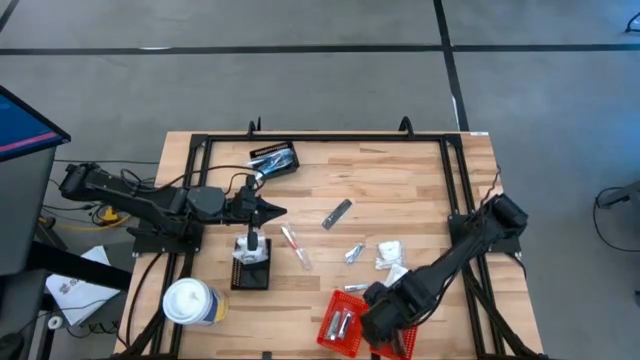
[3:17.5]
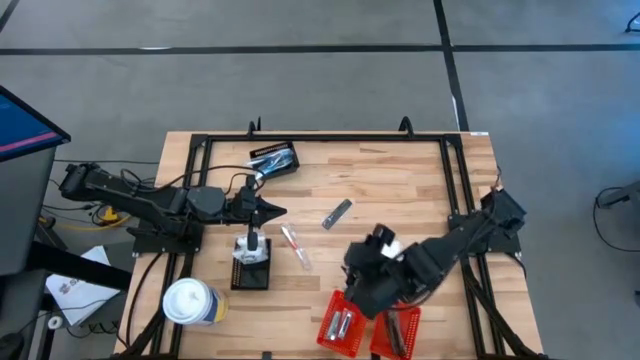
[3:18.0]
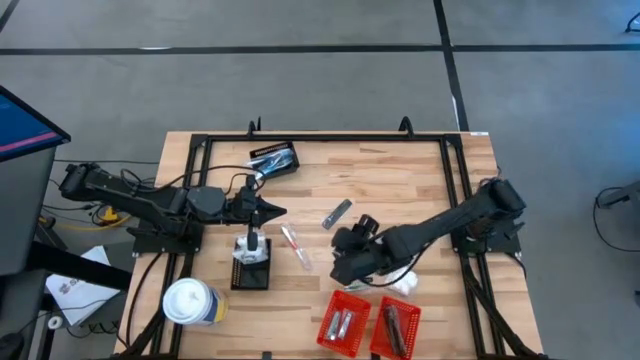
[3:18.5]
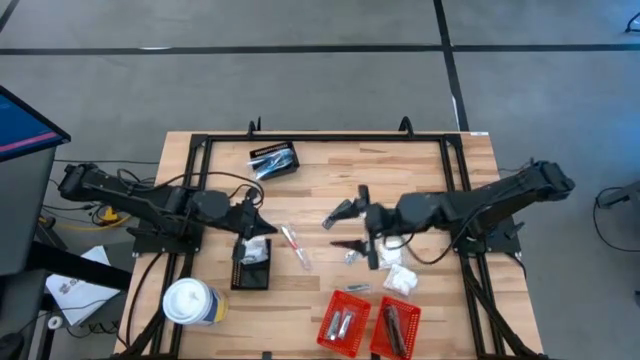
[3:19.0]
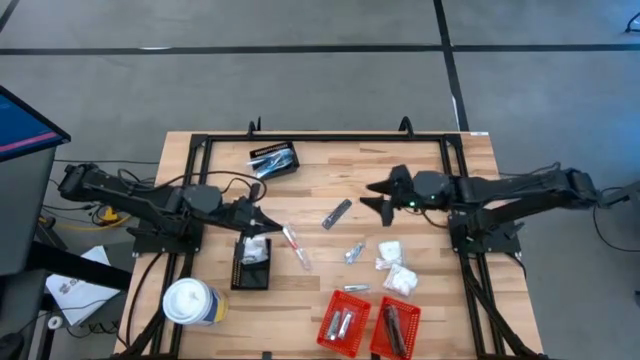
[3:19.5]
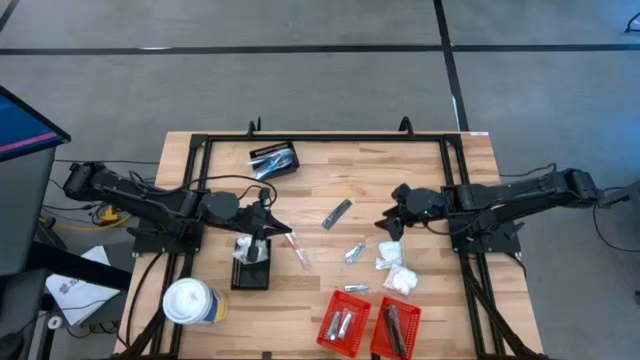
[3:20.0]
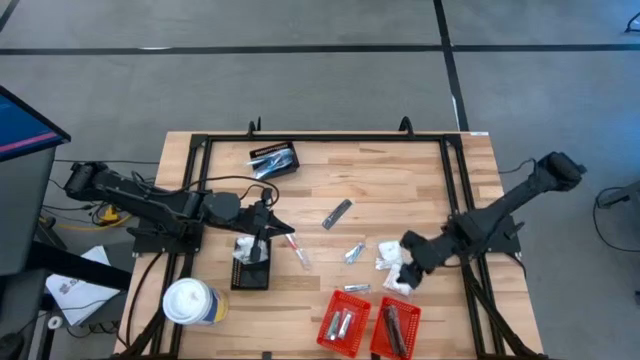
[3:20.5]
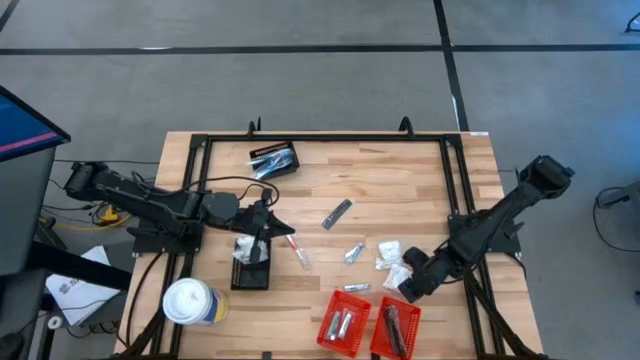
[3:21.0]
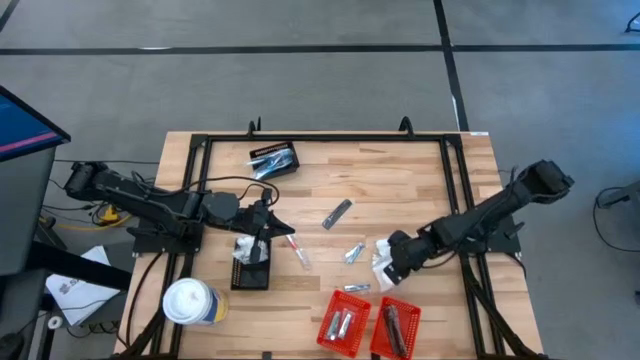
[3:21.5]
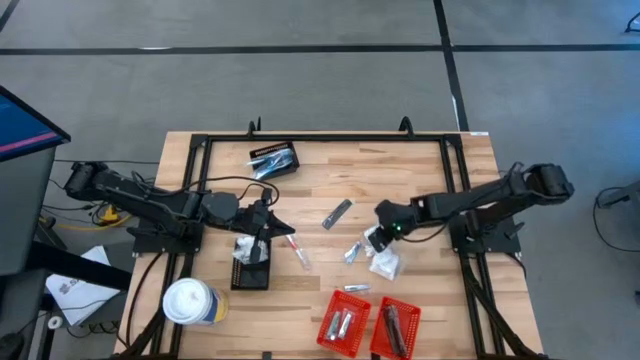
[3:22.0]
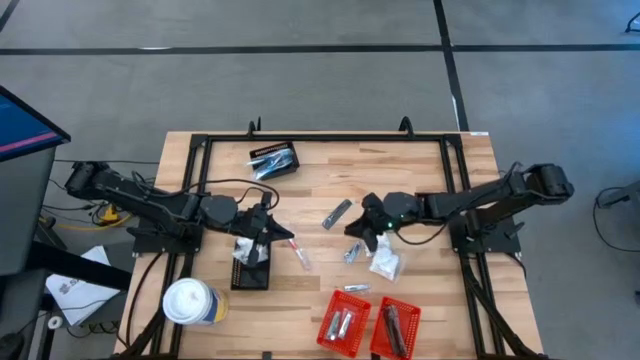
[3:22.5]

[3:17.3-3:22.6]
Task: Pick & Place Travel size toiletries
Adjust the cotton packs

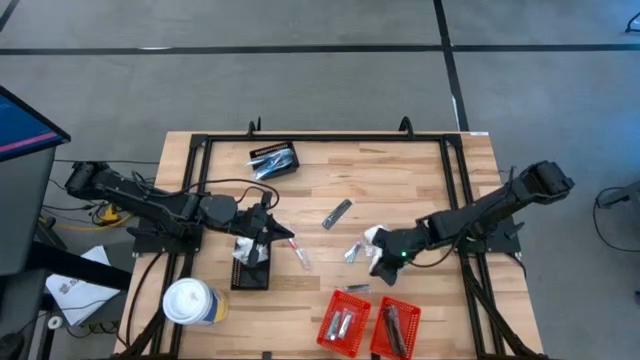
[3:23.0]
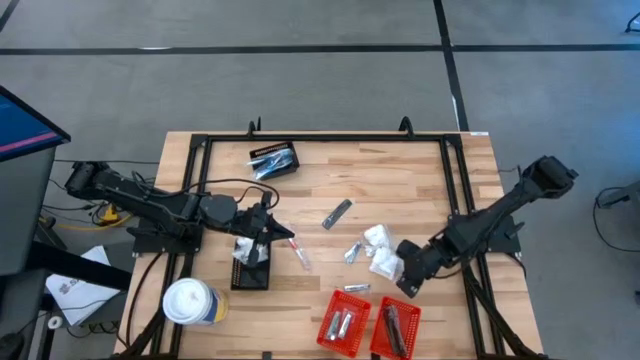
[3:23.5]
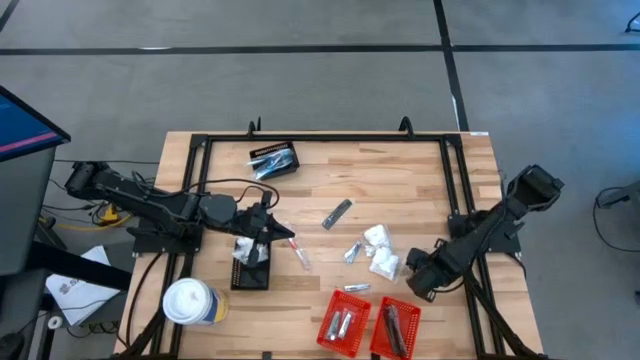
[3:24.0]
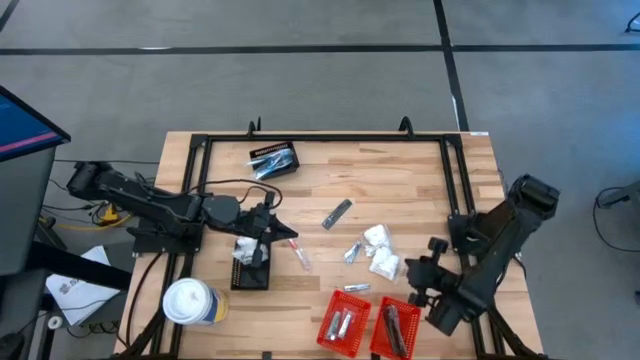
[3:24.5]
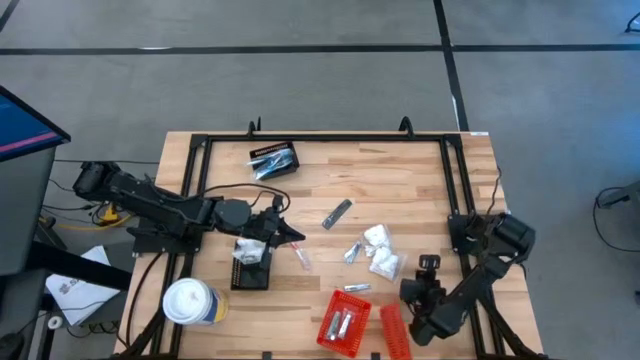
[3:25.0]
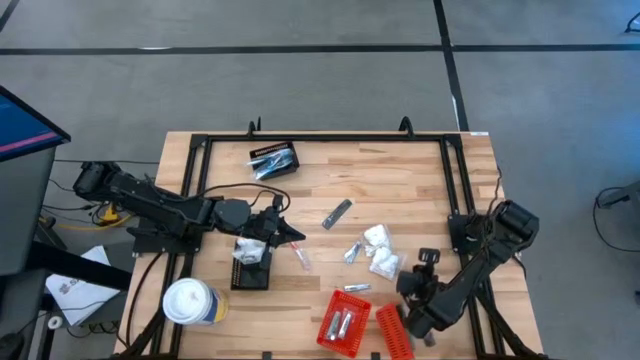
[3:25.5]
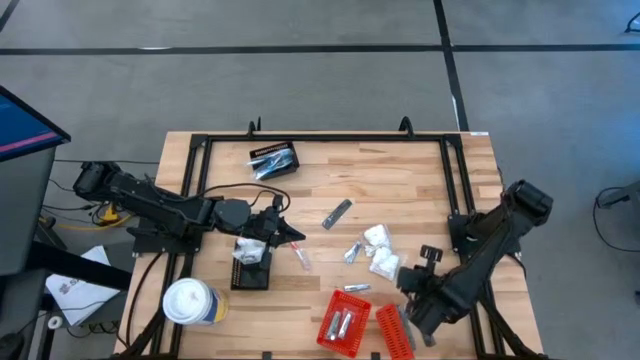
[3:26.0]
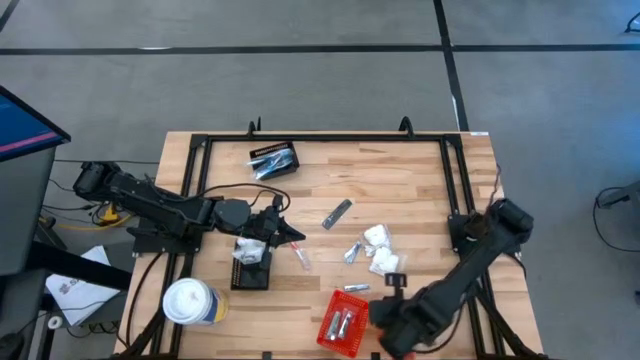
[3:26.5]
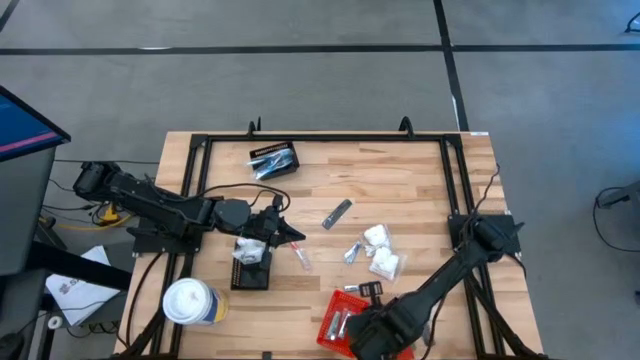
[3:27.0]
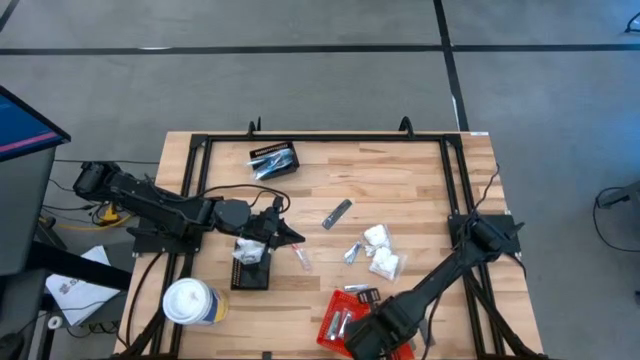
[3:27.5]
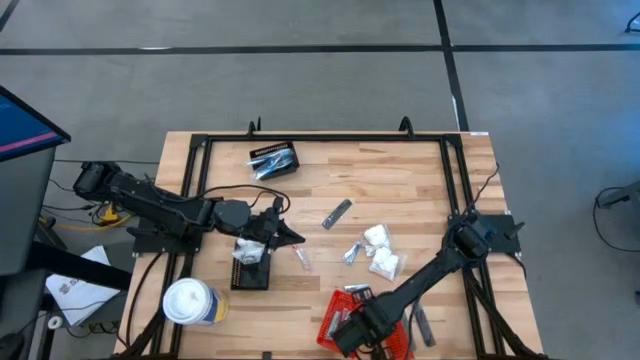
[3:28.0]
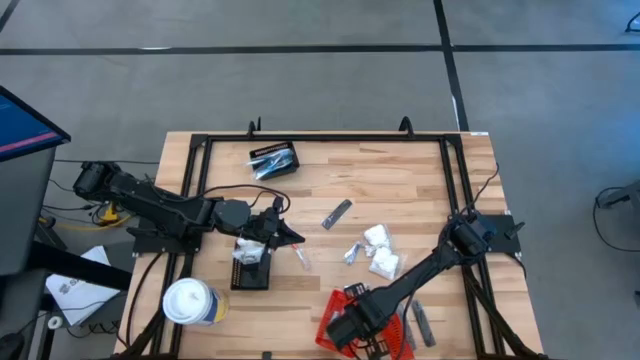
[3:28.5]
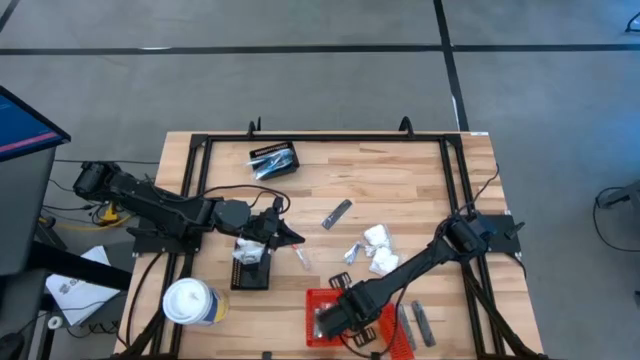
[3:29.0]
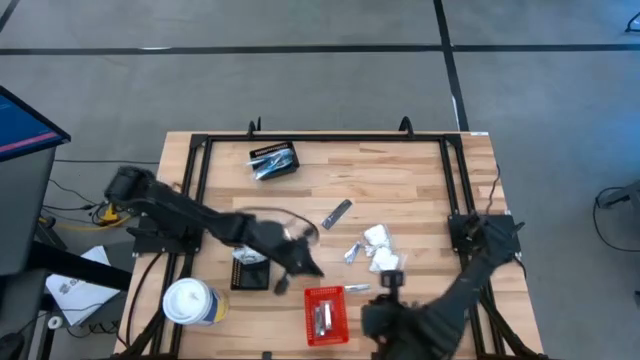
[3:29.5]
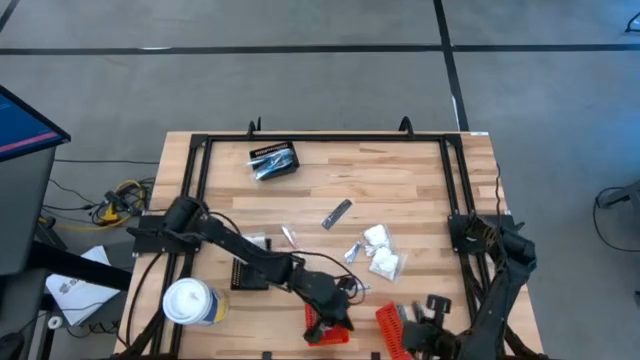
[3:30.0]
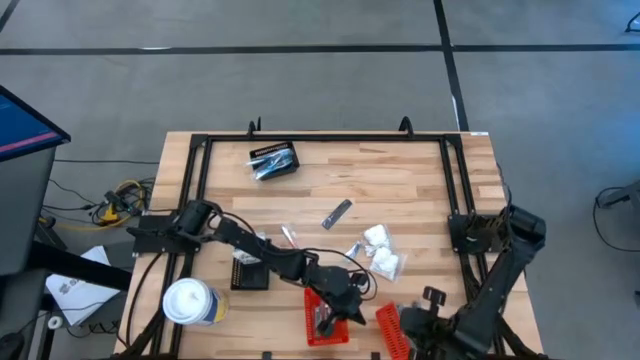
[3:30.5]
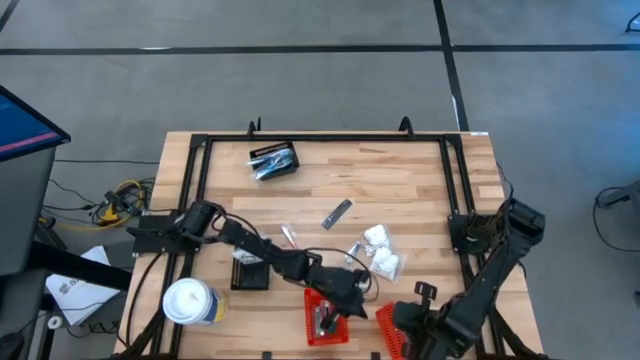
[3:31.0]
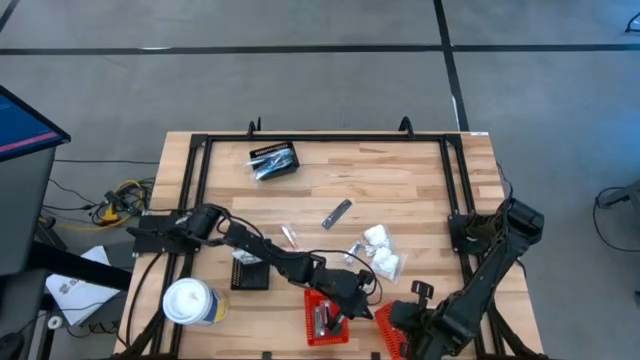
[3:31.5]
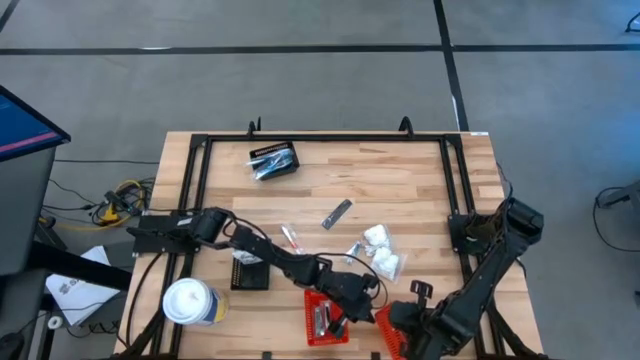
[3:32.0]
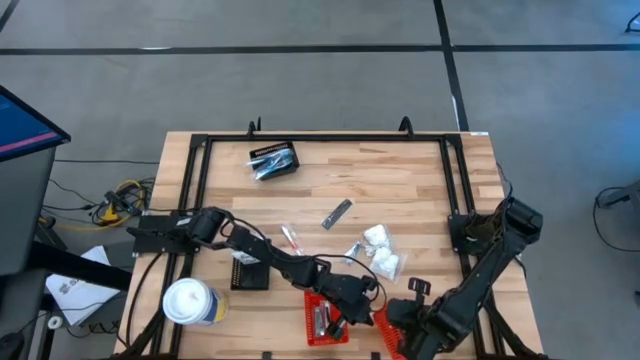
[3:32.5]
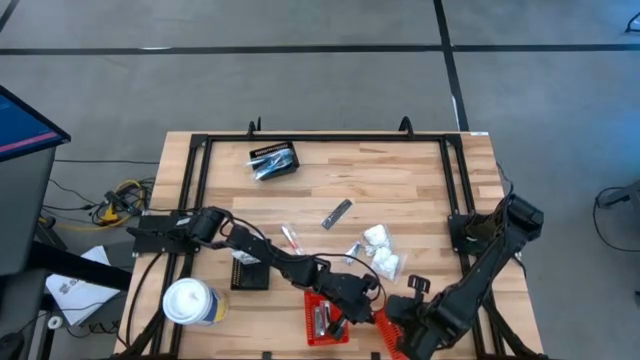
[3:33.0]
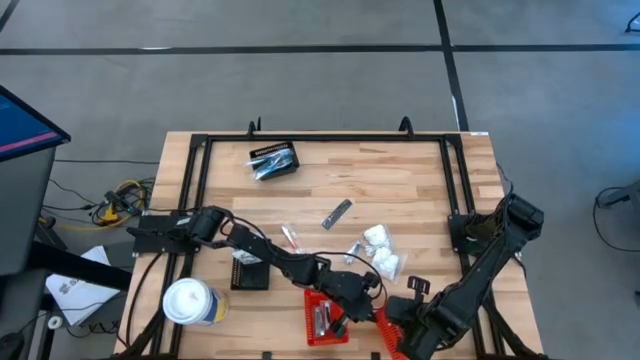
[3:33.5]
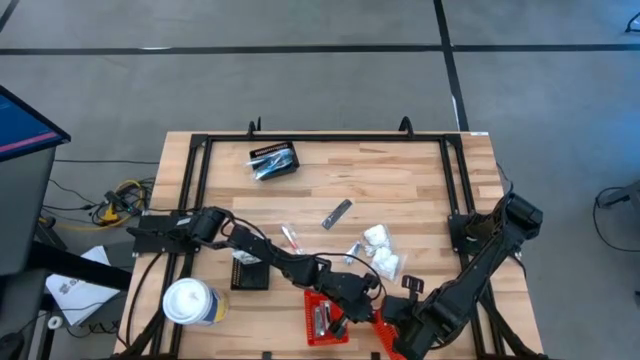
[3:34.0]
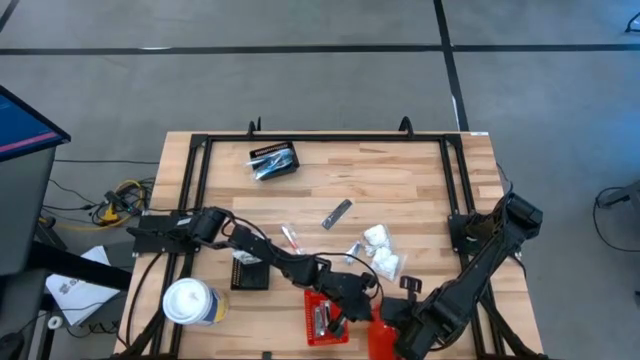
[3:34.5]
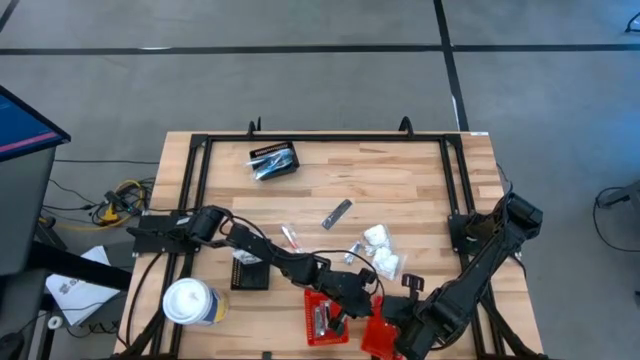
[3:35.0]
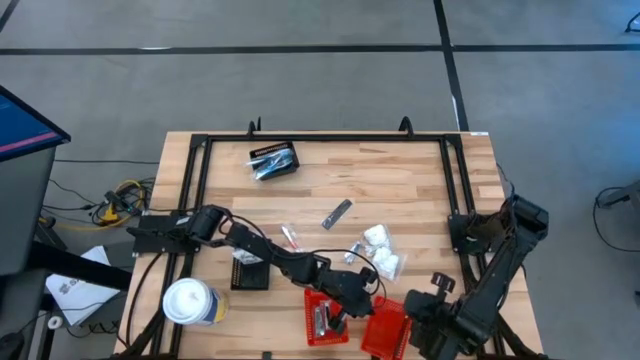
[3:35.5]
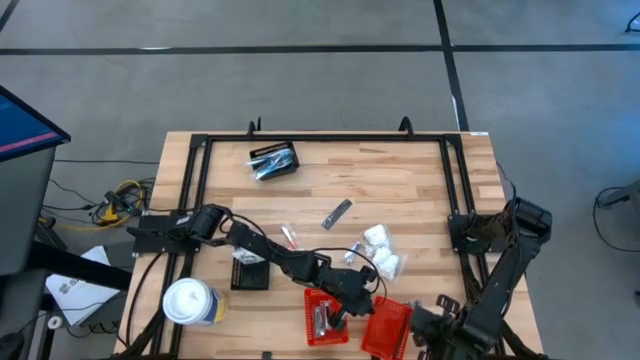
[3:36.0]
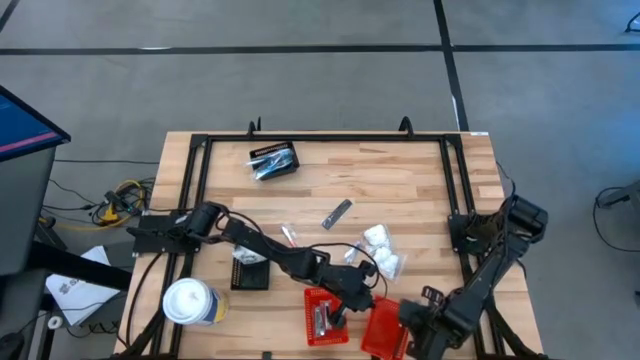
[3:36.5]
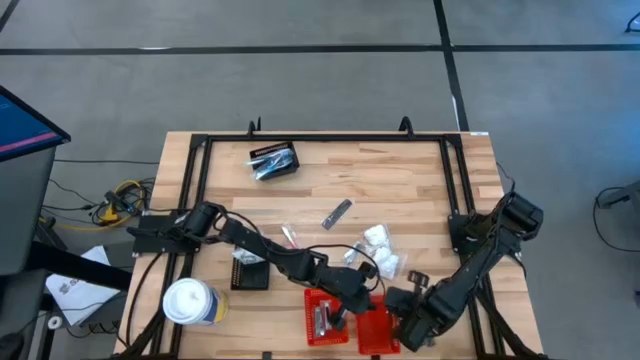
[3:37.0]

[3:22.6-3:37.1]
Adjust the red bins

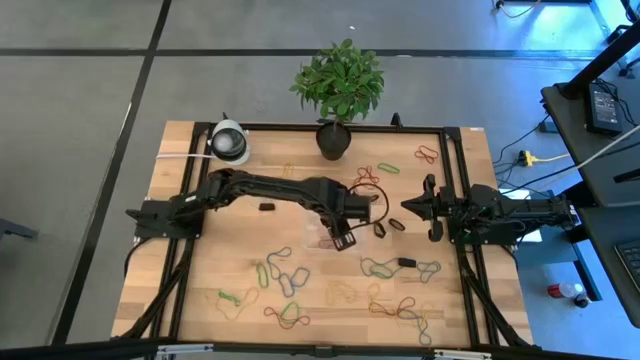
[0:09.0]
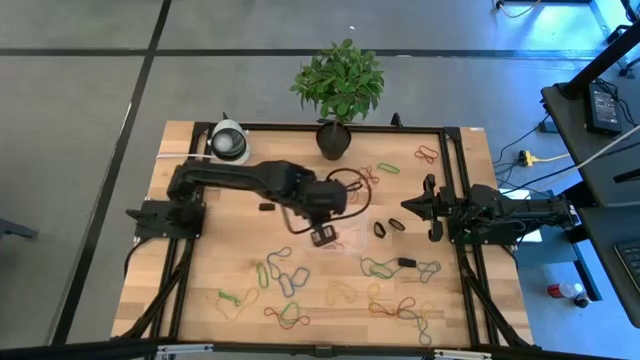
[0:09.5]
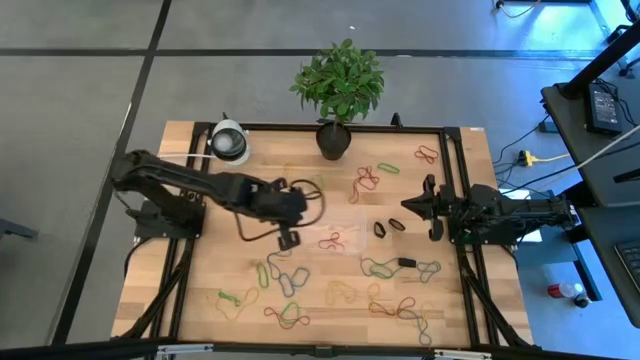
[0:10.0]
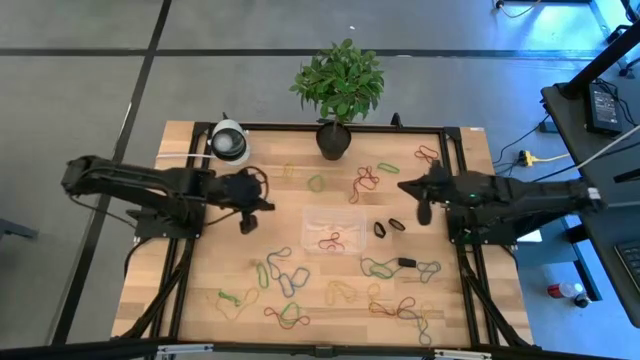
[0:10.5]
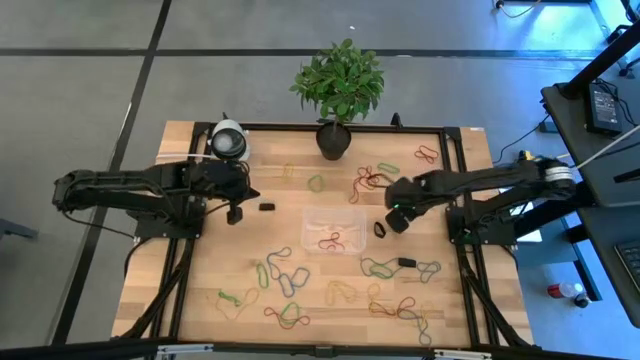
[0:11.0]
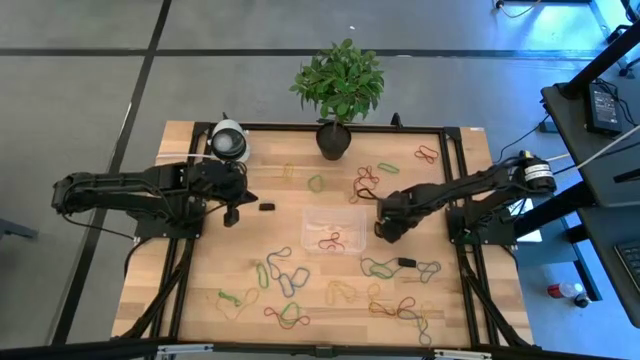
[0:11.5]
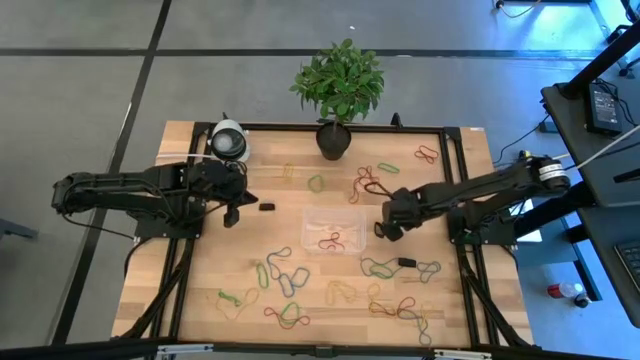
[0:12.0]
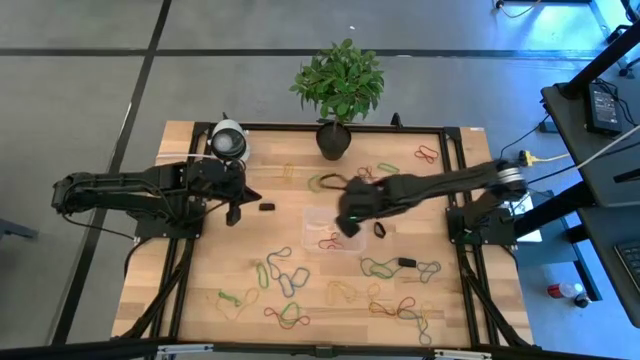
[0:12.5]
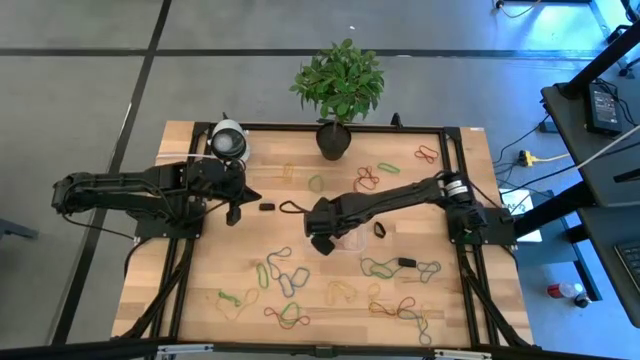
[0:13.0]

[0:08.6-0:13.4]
Task: Pick and place rubber bands into bin
Put the black rubber band into the bin
